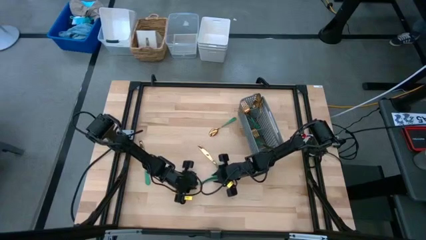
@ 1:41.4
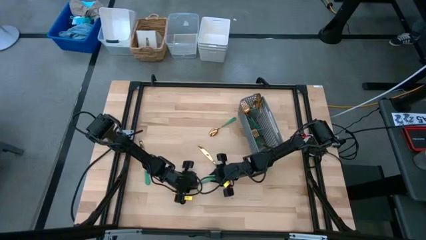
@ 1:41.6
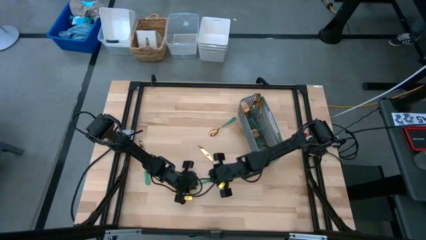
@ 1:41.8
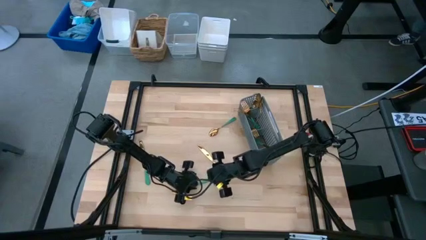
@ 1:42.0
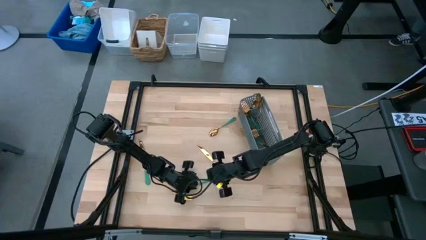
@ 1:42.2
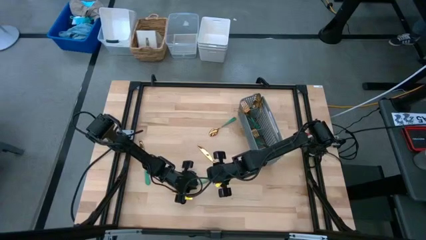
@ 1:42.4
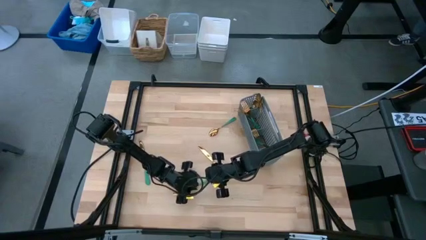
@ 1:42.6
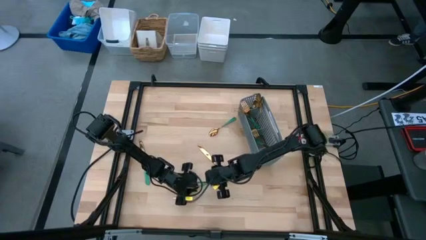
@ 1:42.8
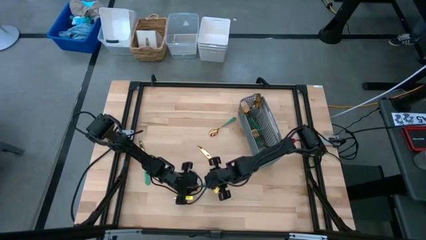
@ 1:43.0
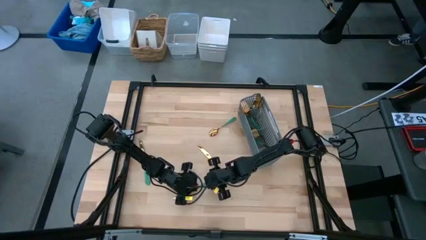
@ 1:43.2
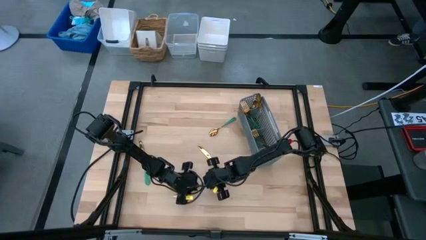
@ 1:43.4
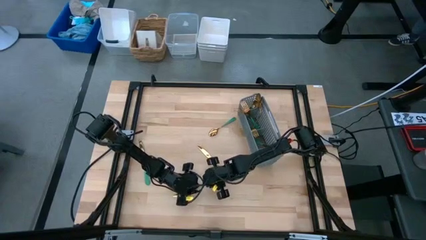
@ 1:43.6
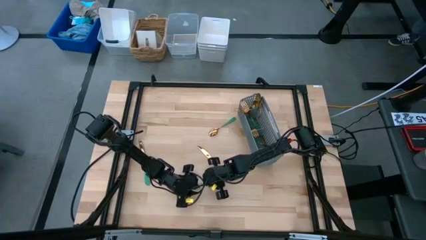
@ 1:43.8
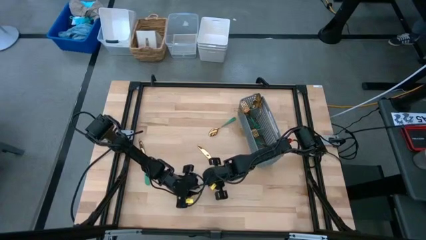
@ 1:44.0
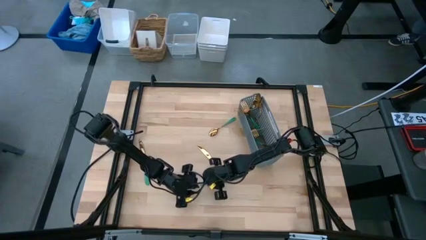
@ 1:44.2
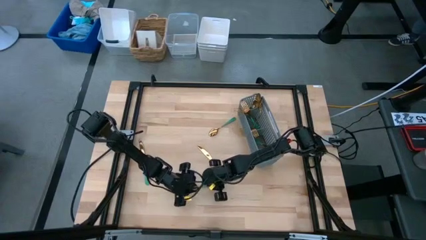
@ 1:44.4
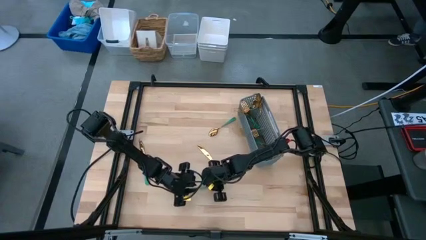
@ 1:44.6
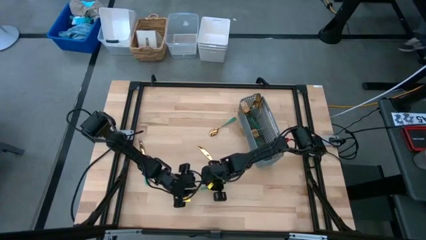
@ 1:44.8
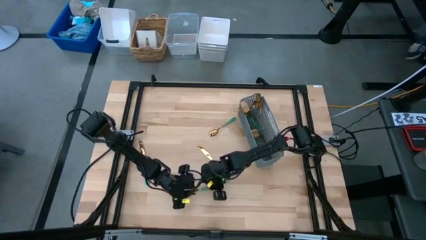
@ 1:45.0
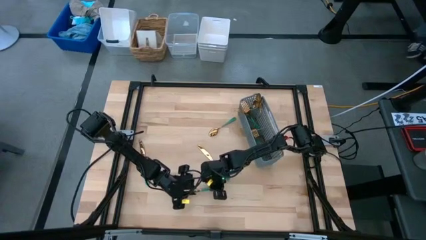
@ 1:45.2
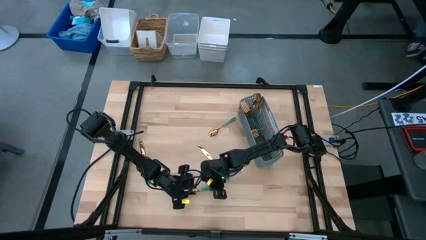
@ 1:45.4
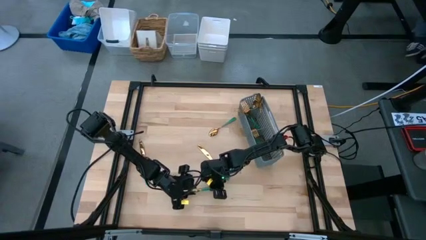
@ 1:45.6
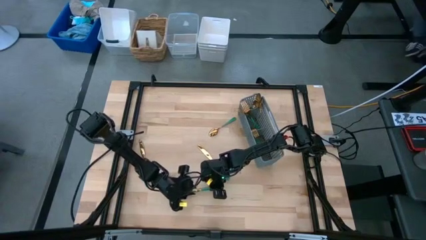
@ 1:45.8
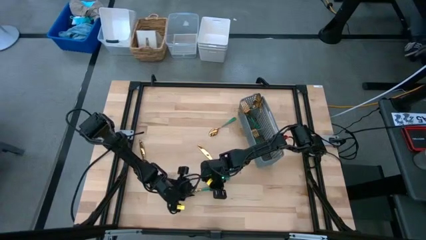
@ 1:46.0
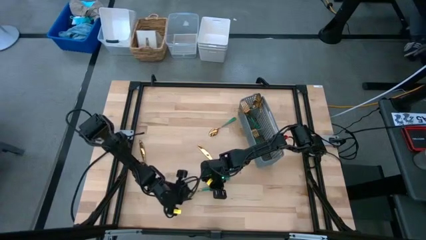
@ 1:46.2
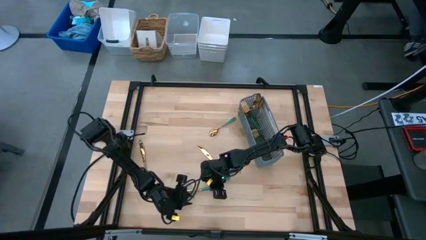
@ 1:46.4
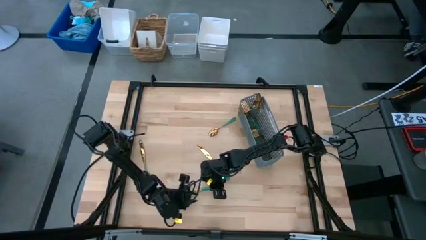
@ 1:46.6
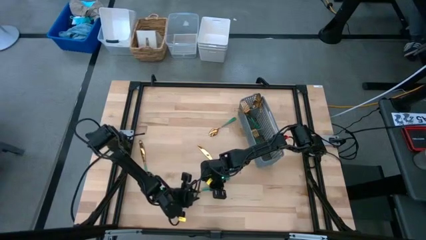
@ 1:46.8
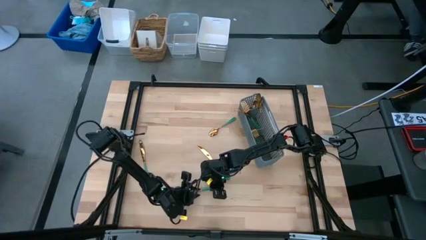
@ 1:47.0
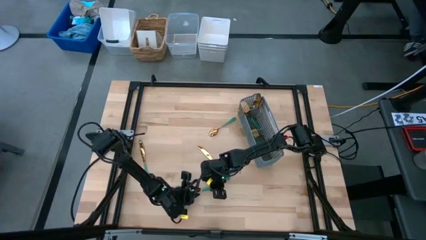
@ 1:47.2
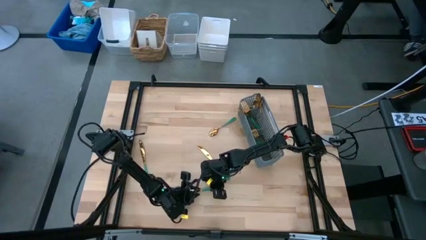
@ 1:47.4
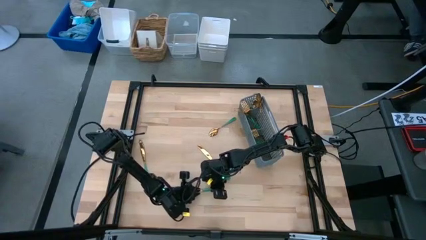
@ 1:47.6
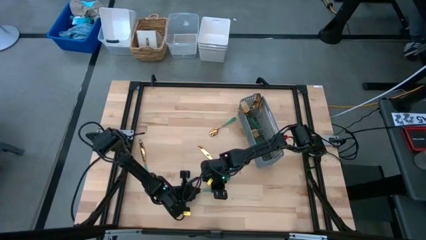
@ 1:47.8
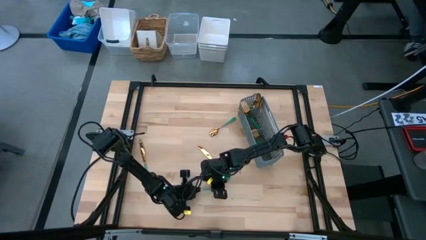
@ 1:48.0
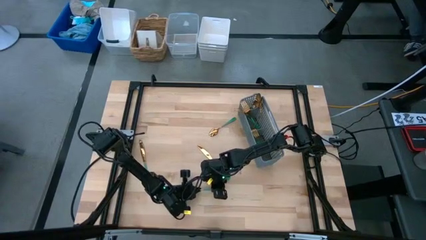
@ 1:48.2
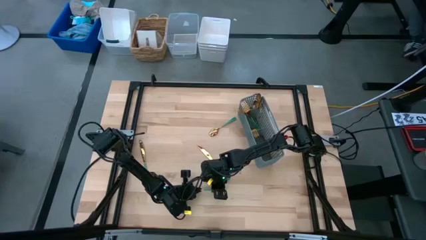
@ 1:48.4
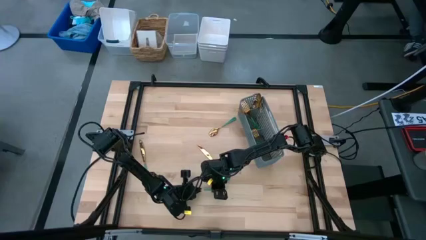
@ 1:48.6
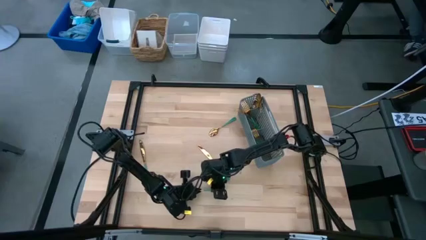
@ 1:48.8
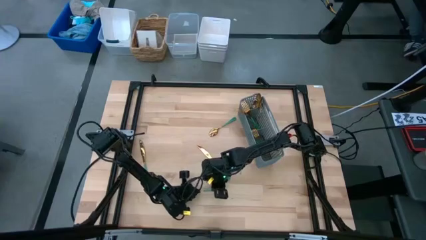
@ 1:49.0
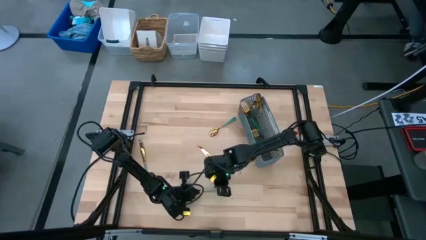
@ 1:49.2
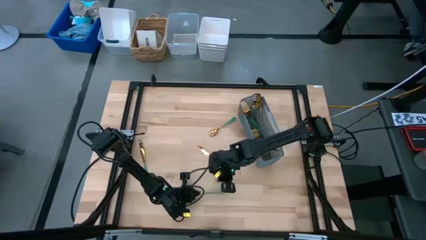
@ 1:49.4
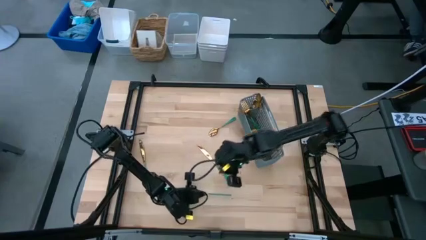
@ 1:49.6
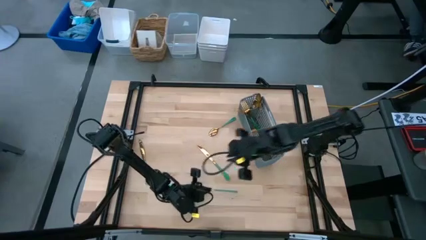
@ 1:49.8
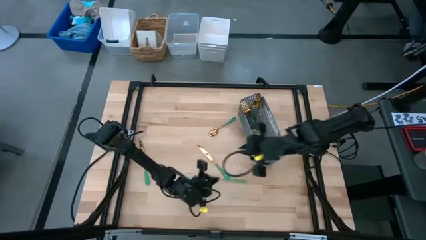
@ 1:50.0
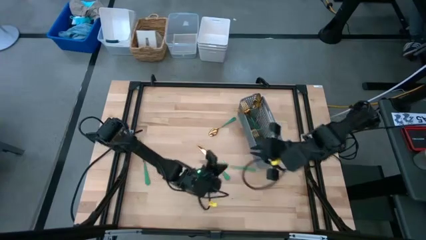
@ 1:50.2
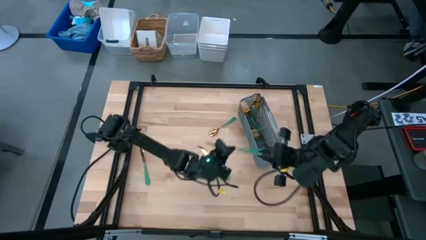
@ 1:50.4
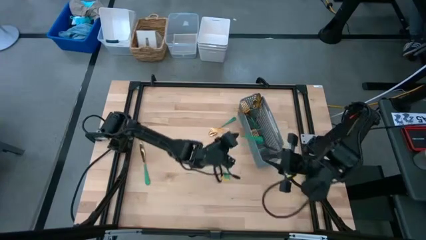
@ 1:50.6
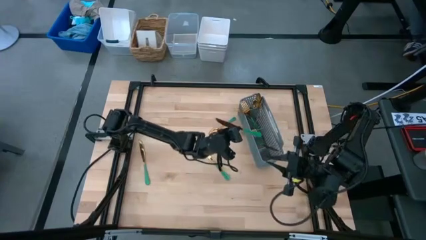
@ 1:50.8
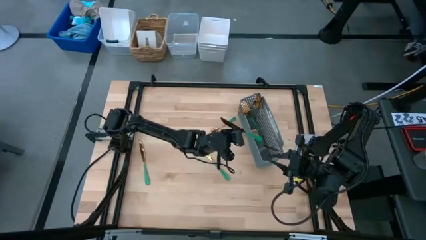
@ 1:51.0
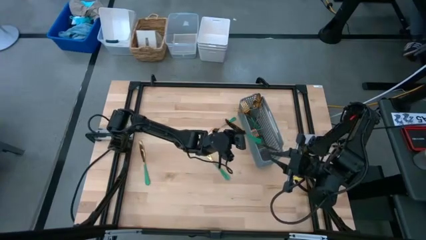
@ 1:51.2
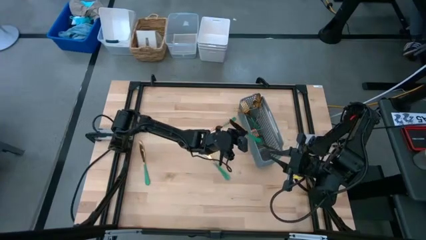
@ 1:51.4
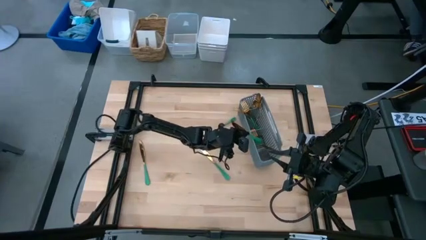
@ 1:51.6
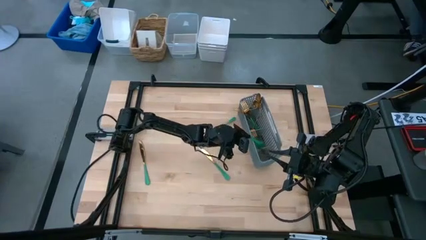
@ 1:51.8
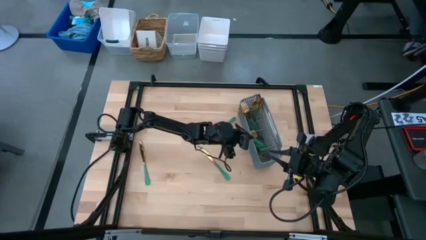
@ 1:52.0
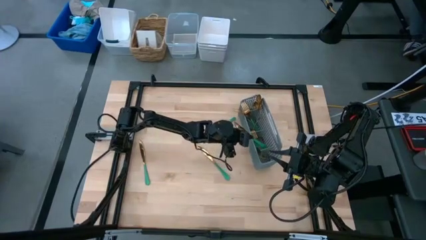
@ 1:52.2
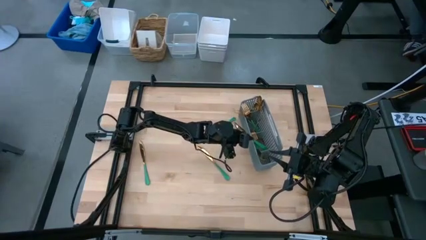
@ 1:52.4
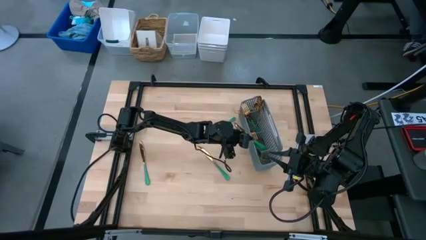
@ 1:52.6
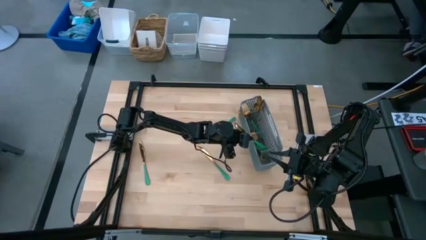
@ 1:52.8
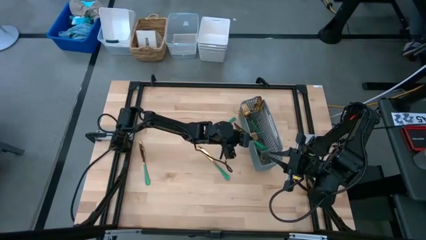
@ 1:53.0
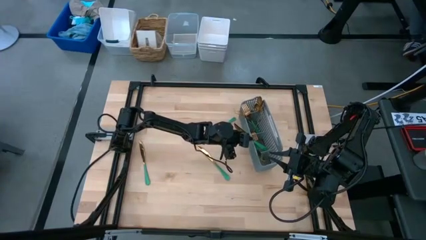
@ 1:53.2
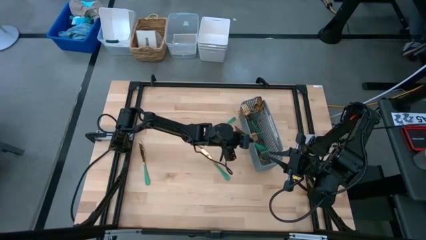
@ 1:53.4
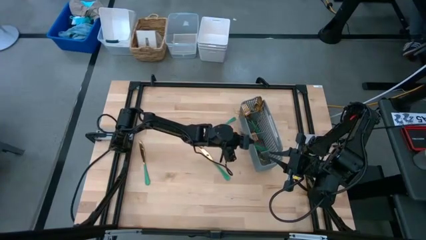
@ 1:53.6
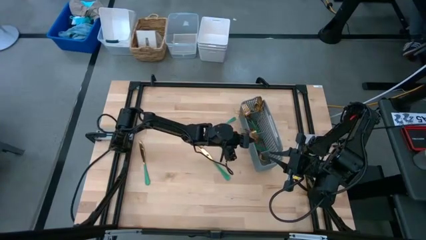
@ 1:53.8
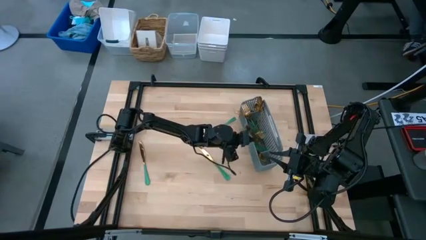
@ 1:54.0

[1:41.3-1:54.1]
Task: Sort silverware
Put the top left fork into the bottom section of the basket

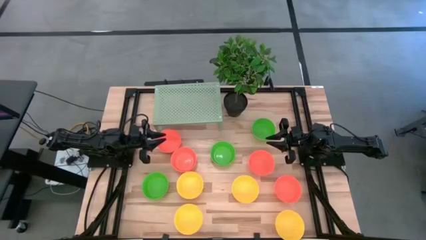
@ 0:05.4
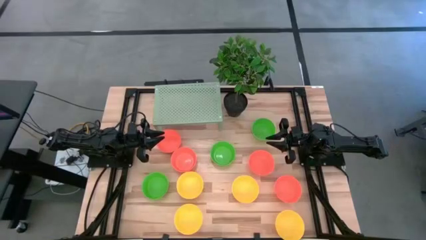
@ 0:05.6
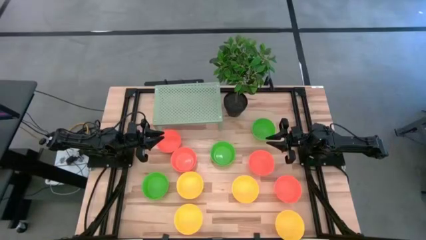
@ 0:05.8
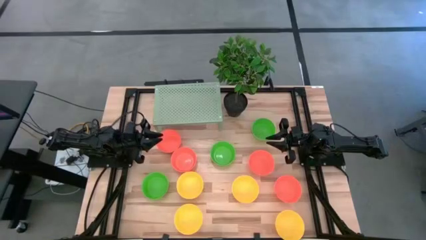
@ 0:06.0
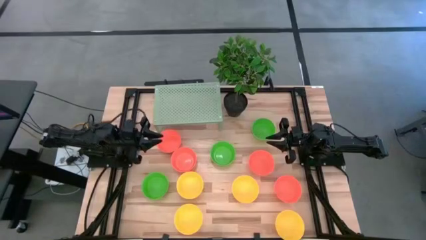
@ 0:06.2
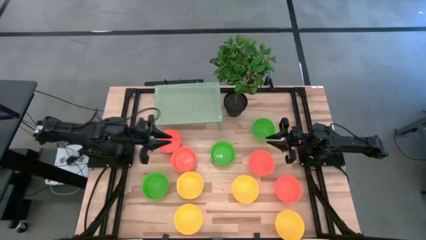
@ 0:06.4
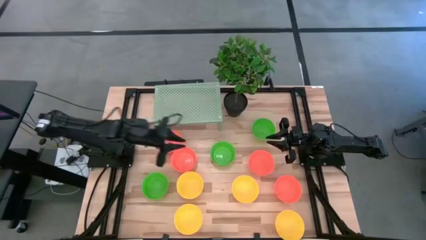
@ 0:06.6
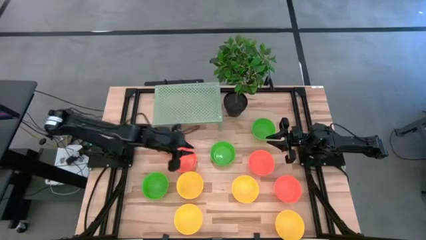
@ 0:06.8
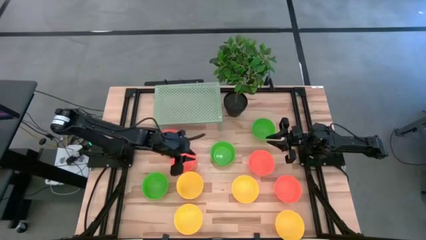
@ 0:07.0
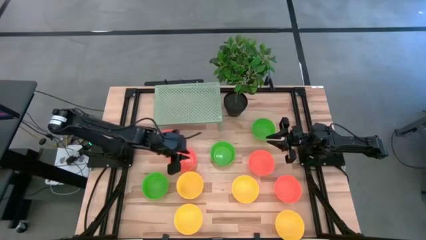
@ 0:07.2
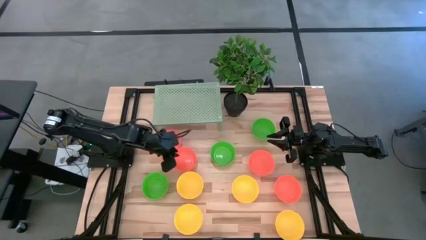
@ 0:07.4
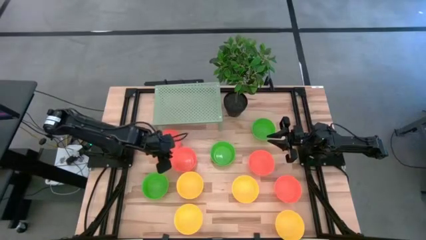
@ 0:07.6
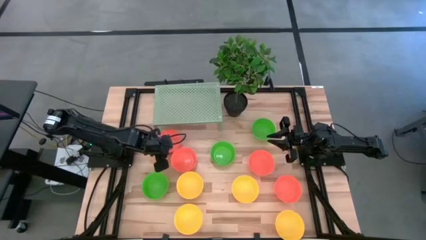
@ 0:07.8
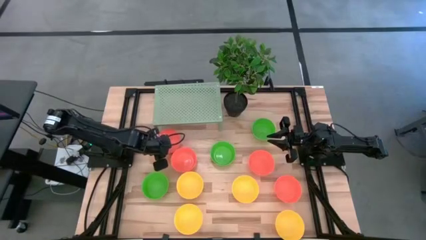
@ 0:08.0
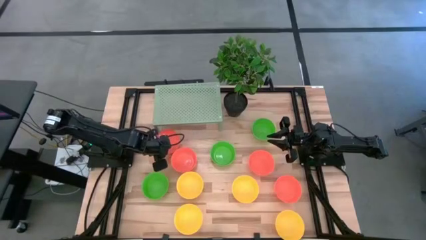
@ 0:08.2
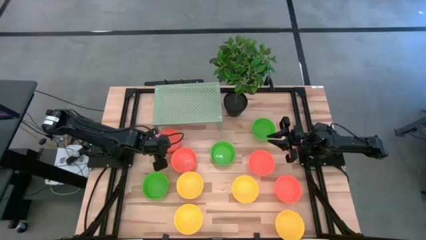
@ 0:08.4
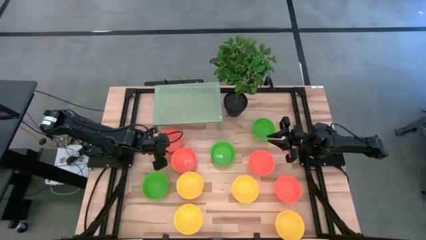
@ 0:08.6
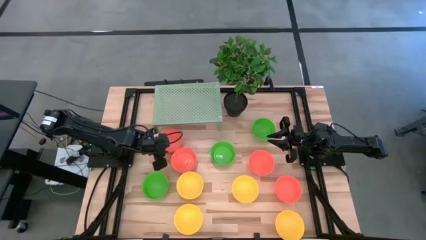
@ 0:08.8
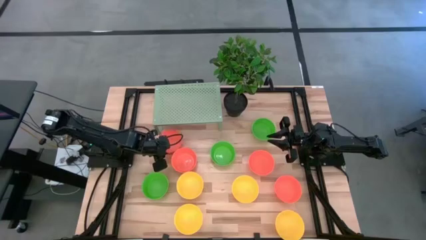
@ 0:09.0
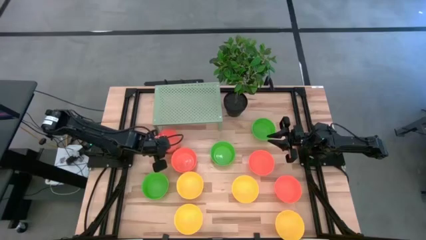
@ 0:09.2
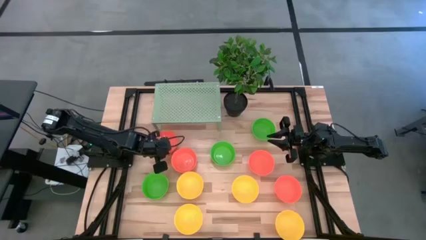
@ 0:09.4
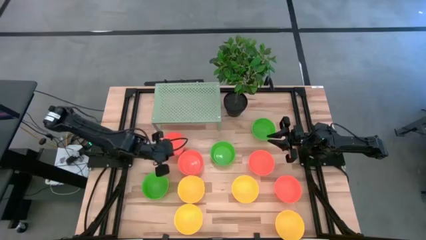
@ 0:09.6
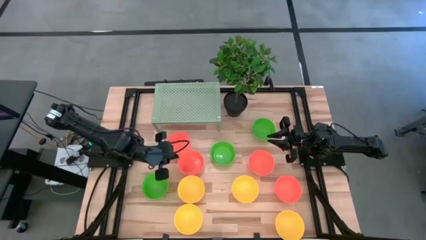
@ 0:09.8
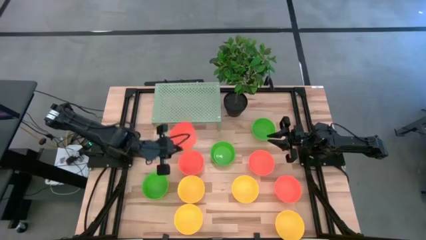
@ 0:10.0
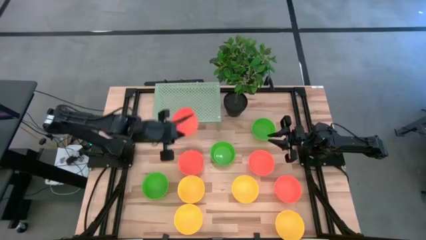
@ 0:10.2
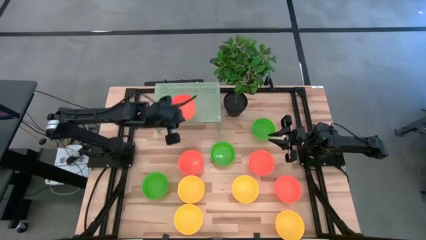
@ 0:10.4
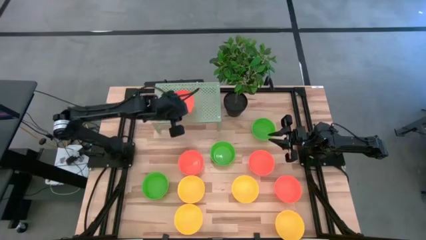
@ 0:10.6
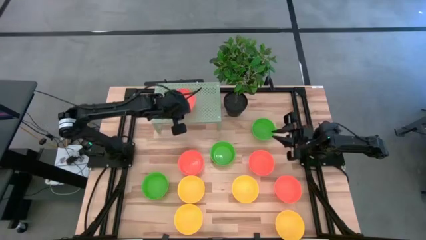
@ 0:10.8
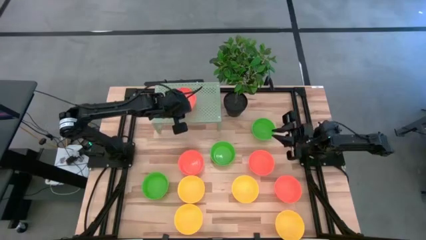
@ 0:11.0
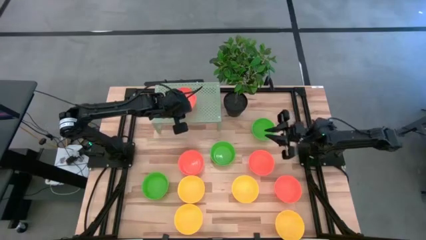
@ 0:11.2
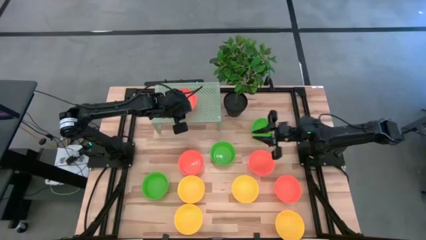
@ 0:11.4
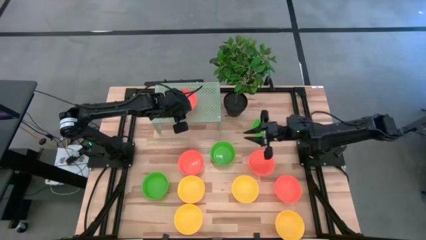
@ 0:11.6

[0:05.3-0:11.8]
Task: Pick & Place Mini bowls
Put the orange bowl on the shelf
